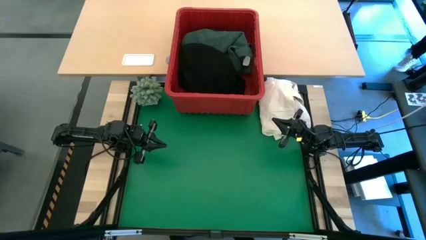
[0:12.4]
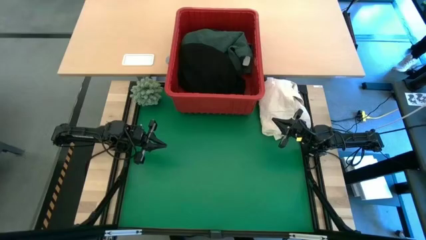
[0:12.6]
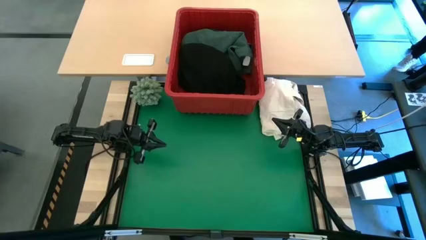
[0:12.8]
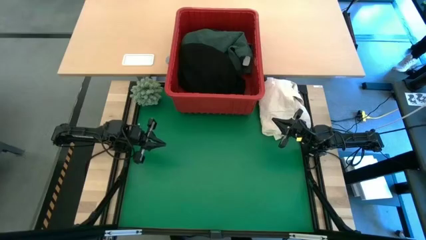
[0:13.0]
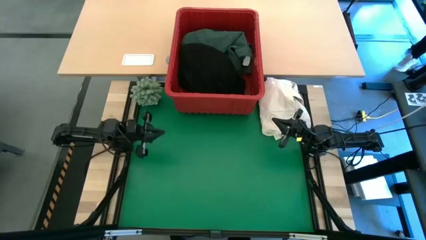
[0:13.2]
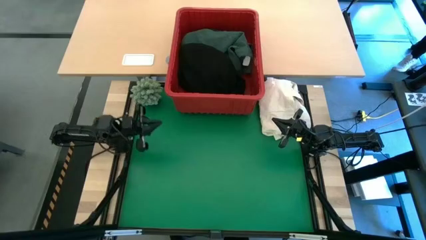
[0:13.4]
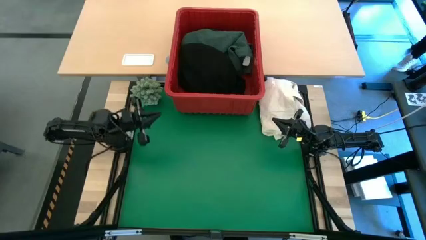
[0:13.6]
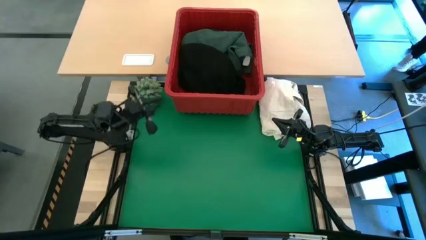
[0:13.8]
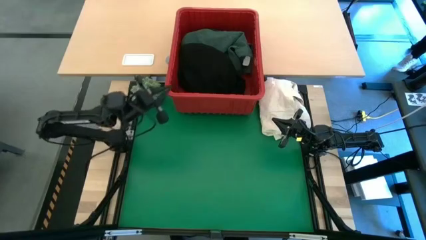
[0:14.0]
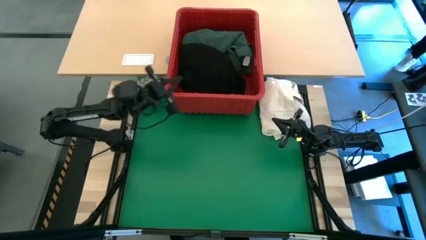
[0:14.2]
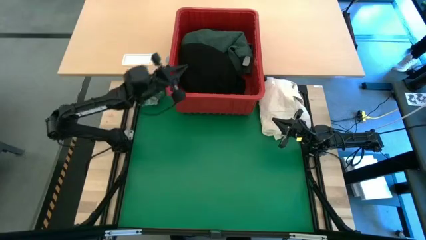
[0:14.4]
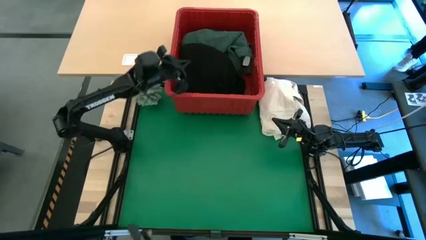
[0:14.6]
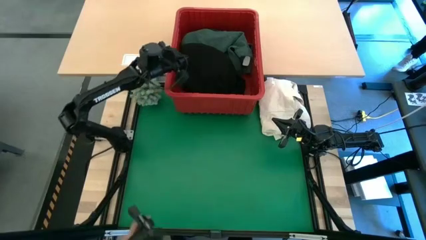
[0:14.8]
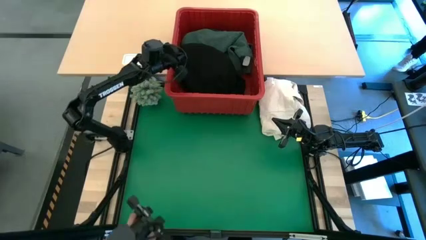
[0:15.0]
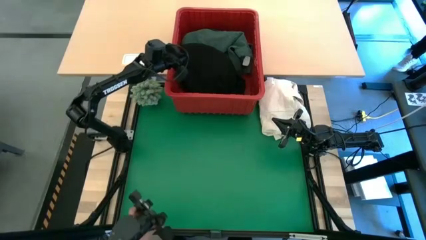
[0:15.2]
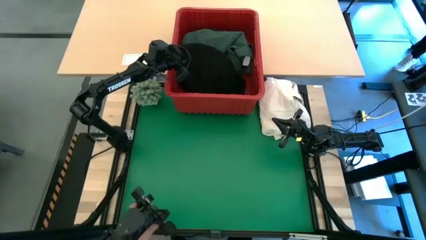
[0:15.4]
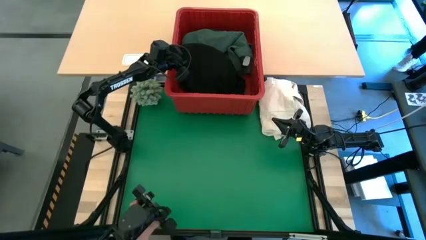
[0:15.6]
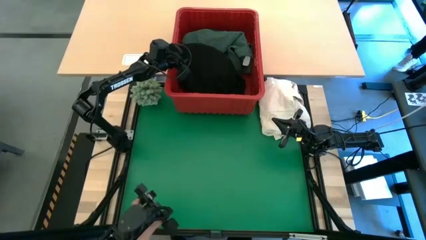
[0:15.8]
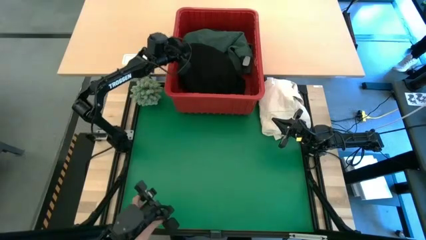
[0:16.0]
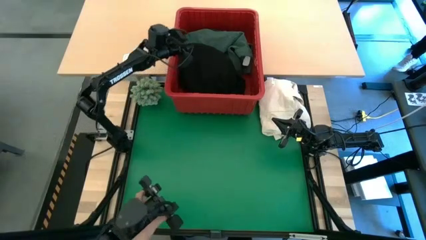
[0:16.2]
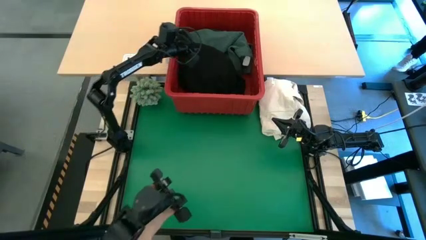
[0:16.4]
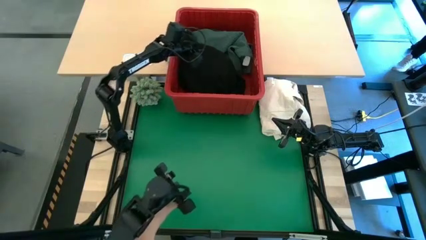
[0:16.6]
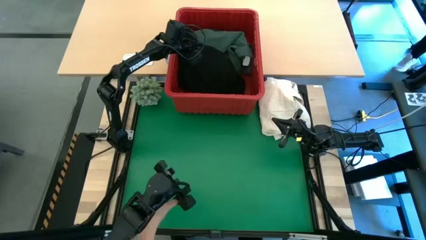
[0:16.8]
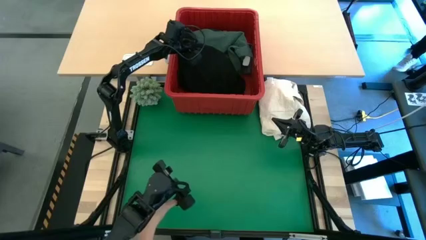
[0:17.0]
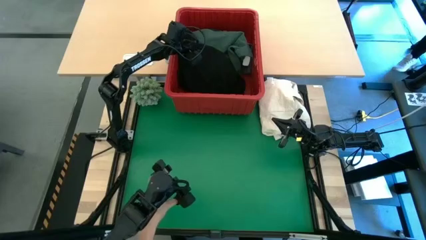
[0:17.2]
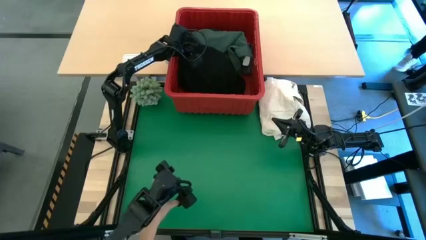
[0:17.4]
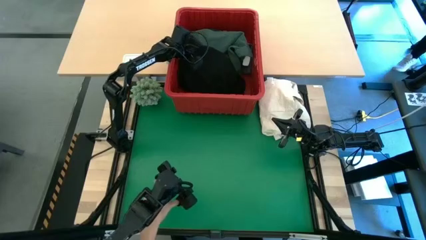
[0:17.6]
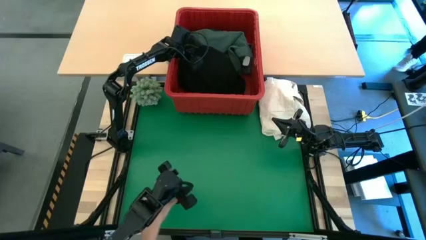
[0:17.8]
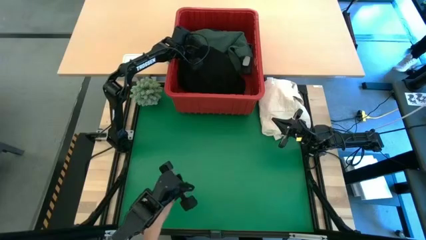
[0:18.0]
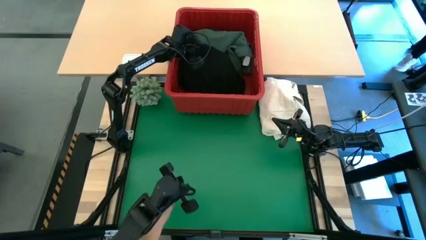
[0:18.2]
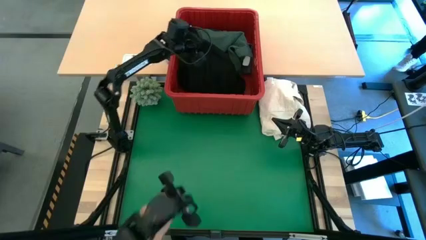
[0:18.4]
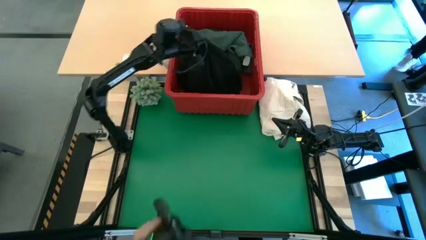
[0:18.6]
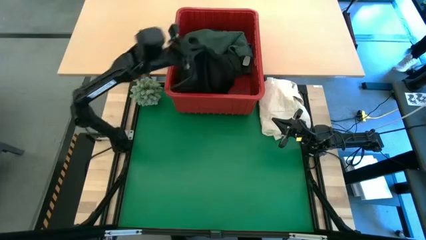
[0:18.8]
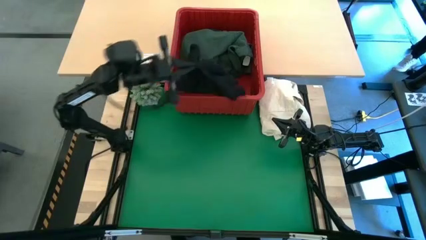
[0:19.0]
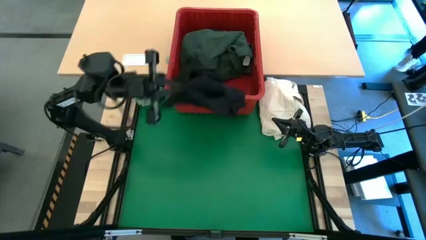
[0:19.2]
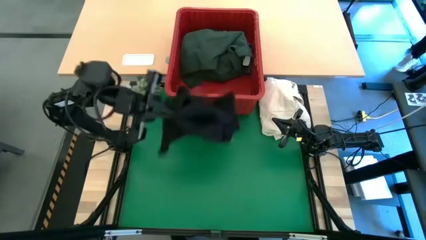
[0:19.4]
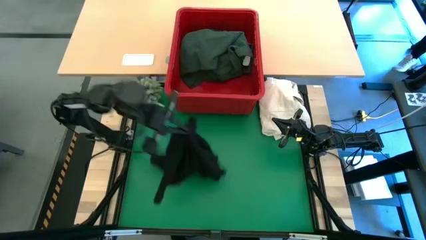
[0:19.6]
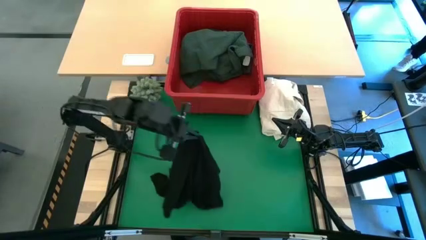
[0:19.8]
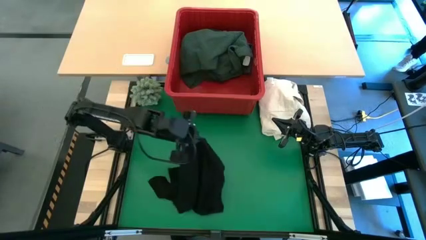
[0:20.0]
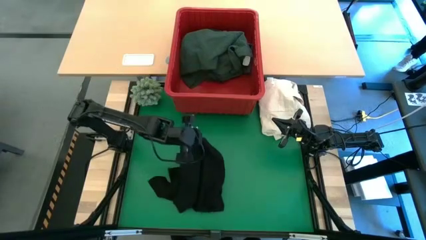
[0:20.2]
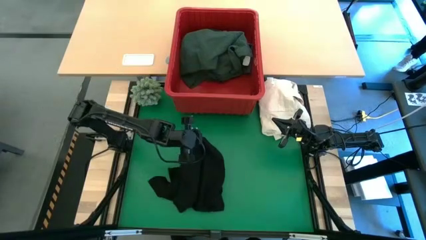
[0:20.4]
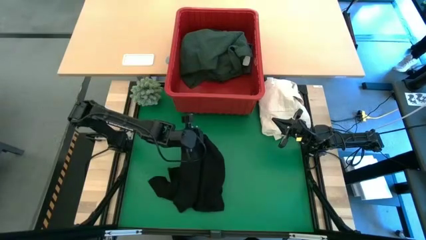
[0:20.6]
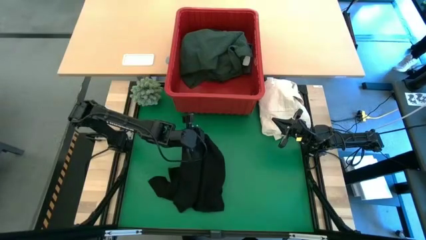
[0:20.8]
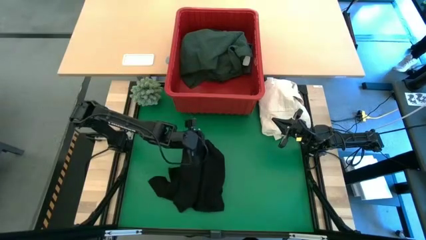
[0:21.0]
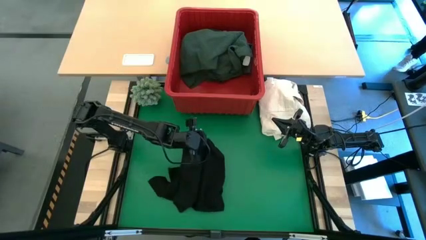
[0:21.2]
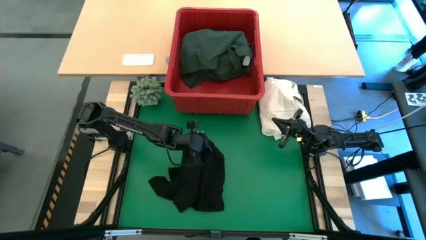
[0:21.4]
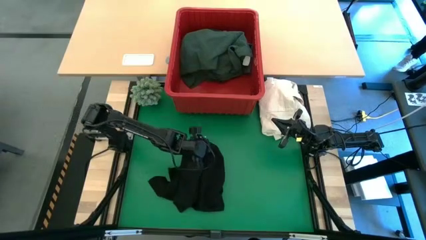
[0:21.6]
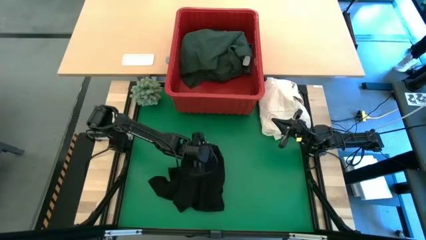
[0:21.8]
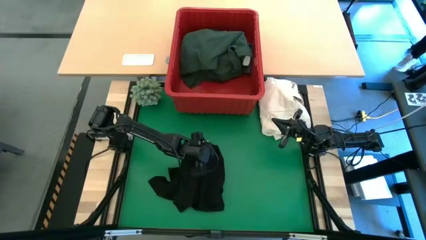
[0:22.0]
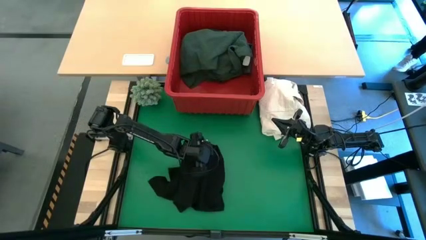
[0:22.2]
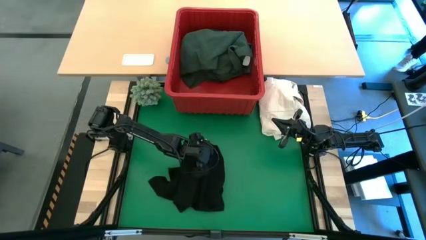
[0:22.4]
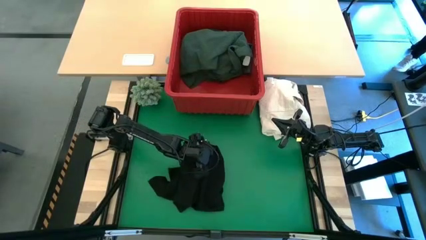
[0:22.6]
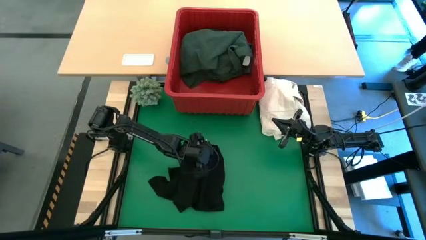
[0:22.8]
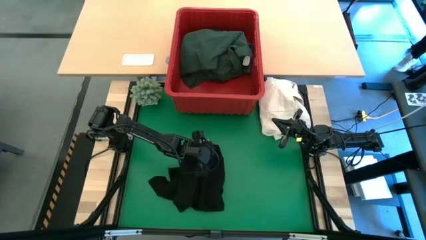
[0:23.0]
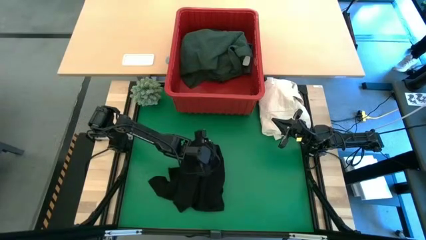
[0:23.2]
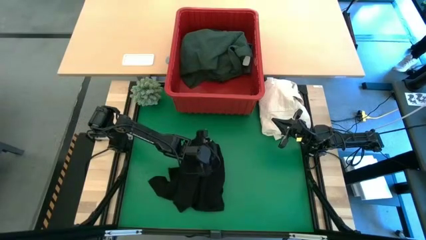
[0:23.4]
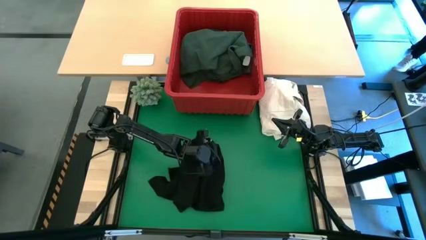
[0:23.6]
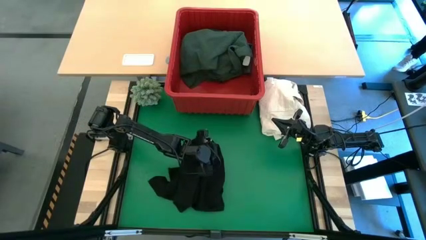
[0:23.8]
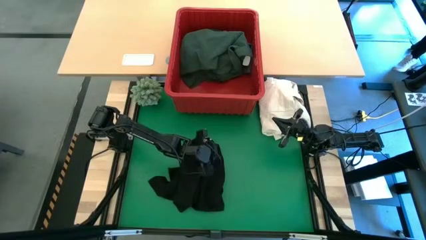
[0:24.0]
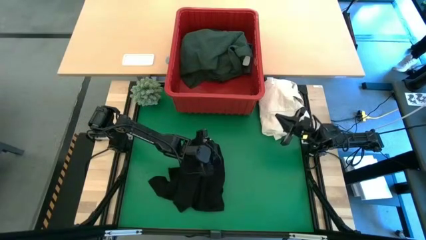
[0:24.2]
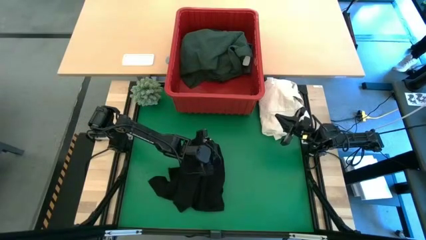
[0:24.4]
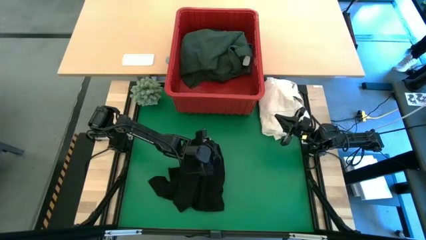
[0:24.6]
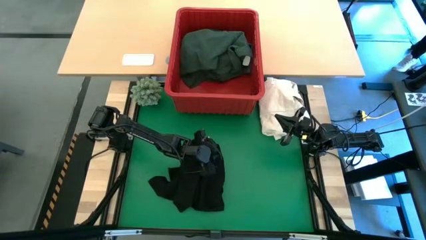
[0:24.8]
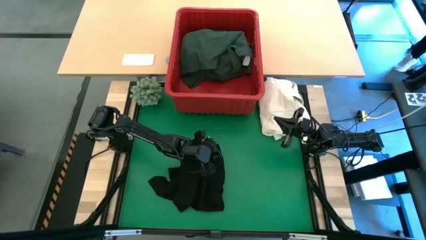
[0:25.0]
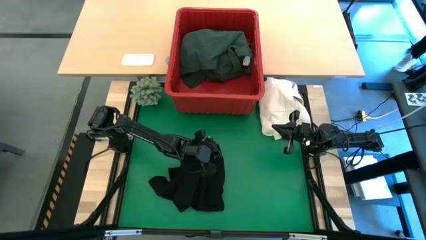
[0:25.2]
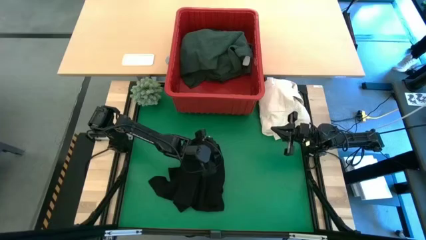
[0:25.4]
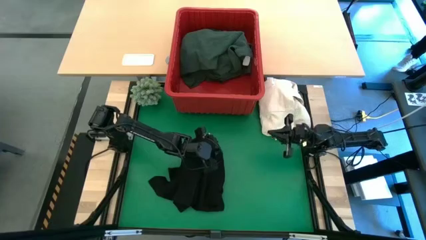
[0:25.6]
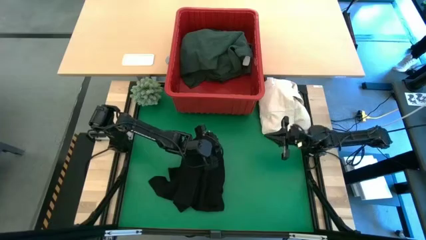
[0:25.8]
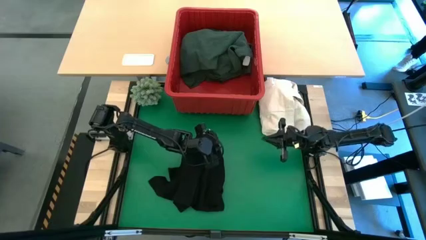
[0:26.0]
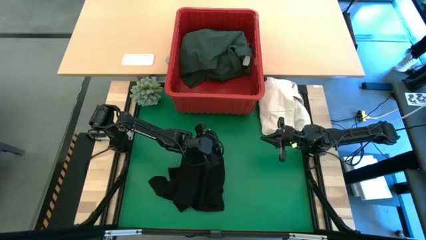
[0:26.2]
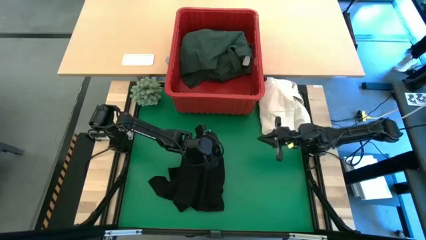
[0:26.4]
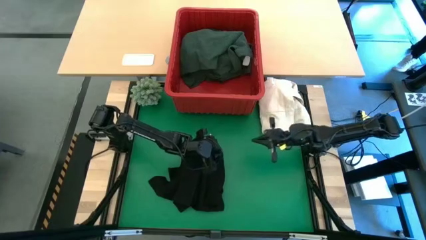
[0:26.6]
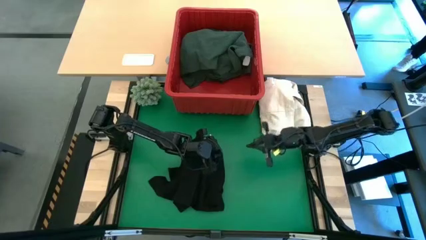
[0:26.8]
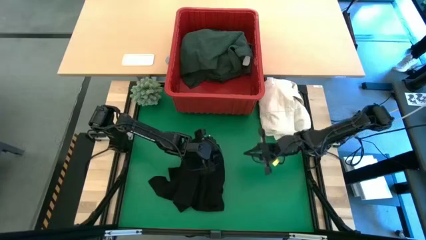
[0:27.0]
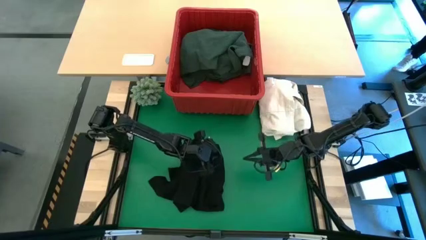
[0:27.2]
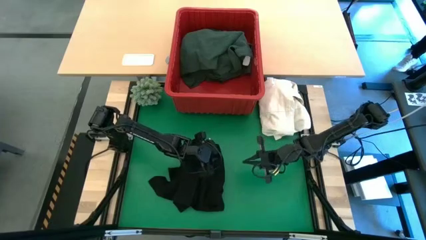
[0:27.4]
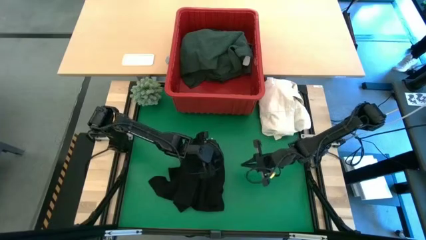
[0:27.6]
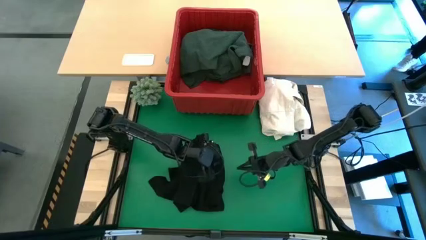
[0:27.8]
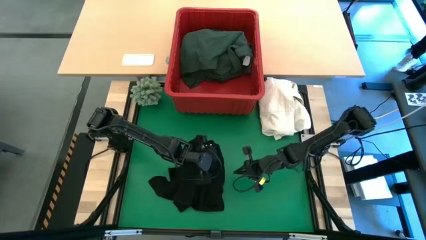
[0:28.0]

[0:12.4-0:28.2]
Task: Fold laundry
Fold the black shirt
